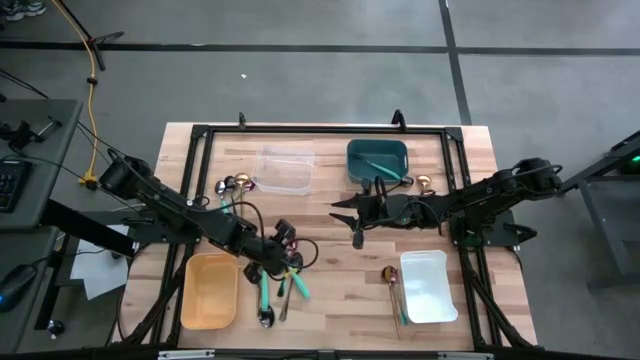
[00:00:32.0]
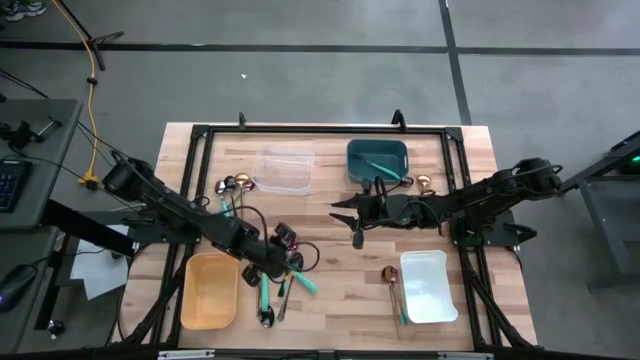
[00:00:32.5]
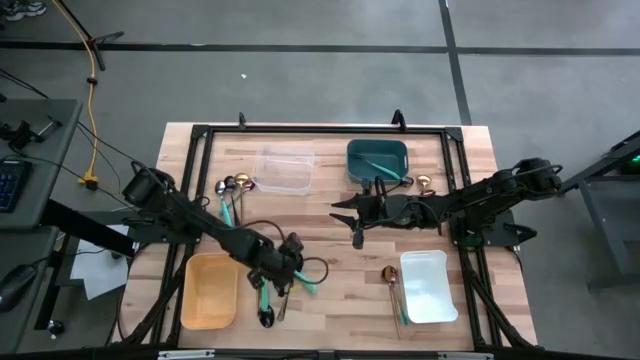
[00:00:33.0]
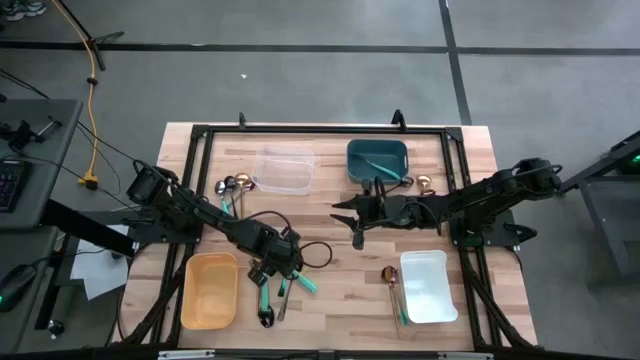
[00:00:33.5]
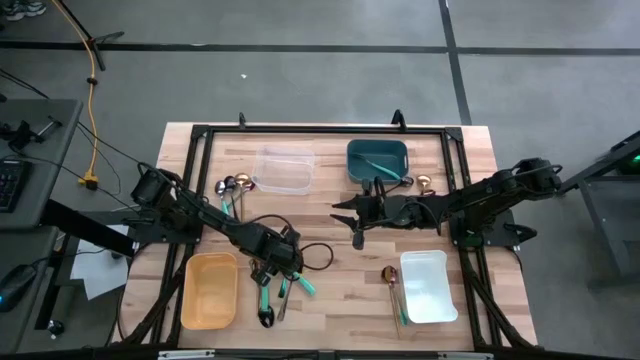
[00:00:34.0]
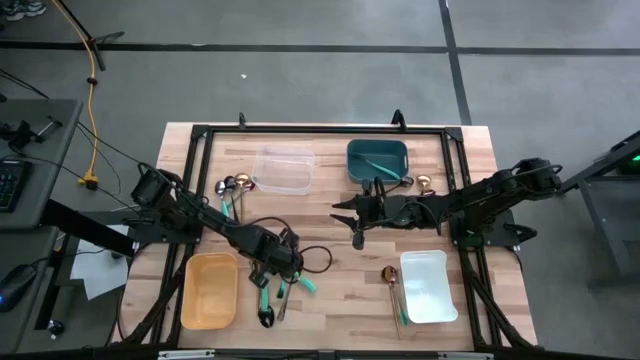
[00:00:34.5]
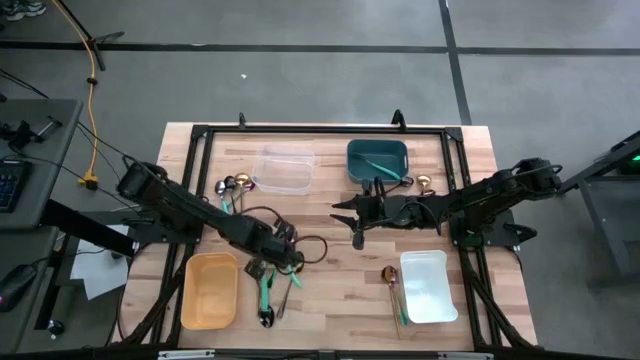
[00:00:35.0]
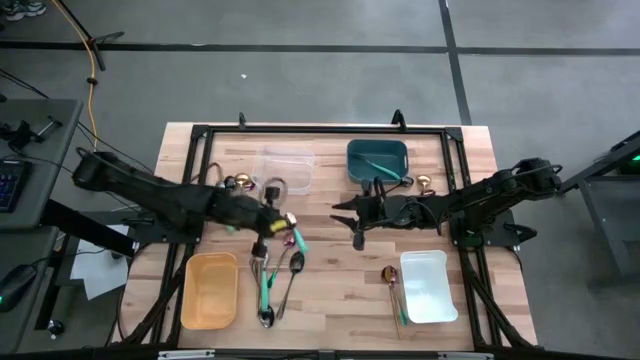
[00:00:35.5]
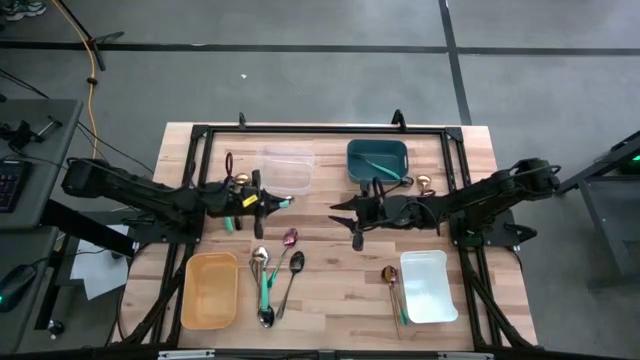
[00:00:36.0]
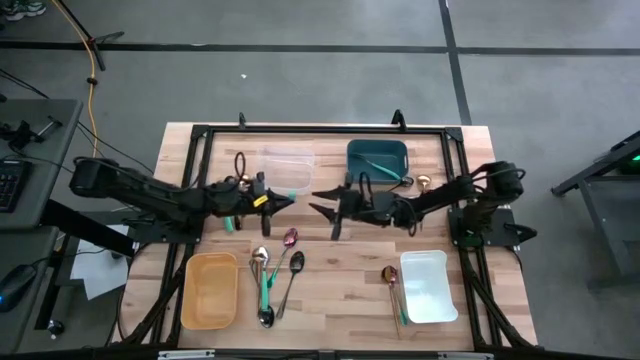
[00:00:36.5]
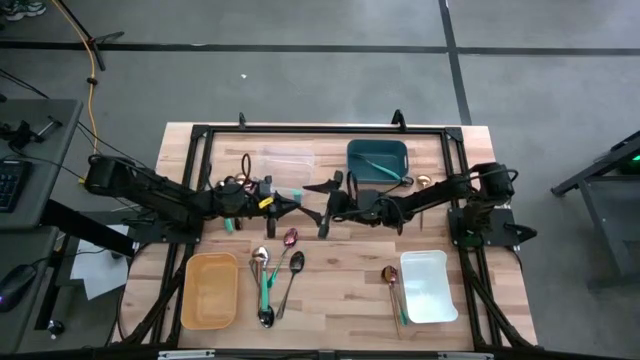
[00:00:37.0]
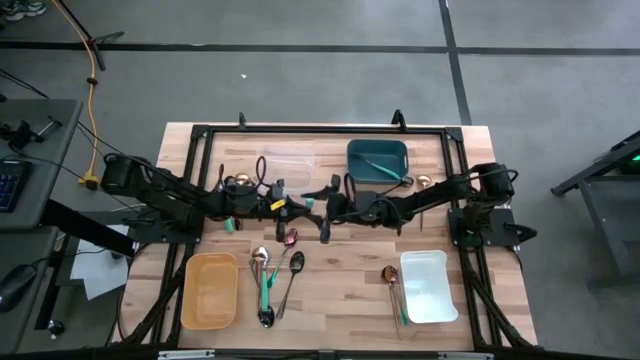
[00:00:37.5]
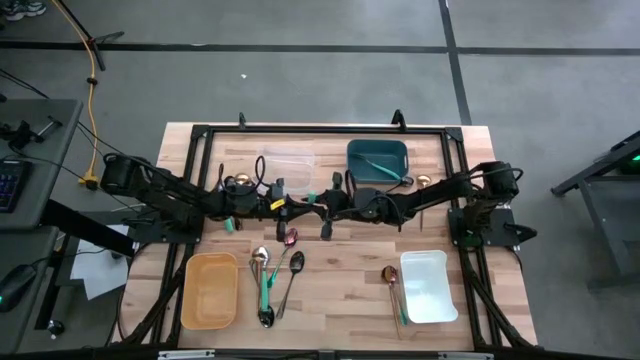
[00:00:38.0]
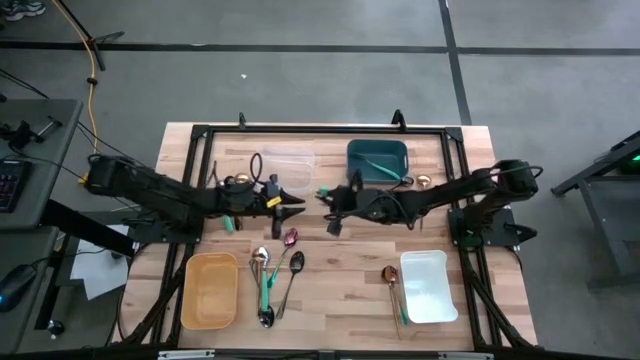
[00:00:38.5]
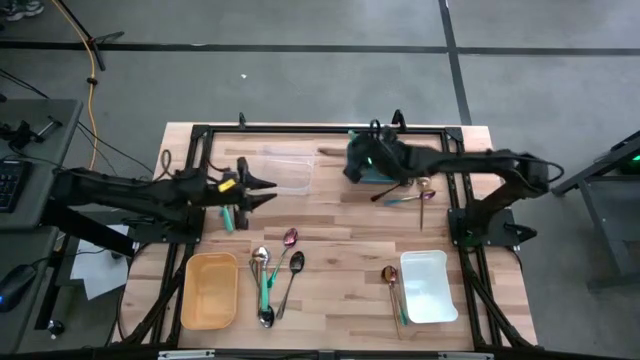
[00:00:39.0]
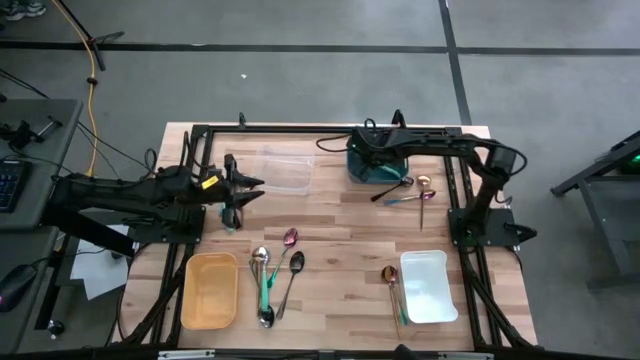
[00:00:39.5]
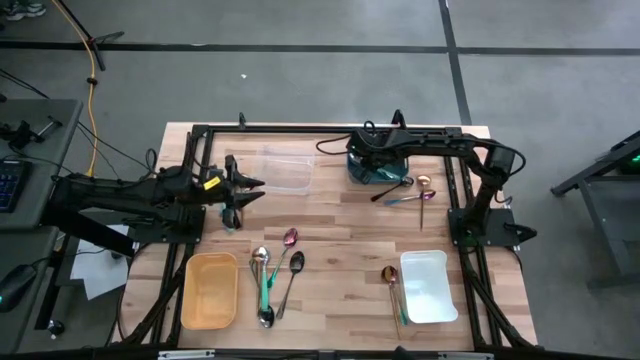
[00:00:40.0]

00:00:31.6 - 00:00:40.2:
Task: Sort silverware by color (type)
Put the green spoon into the blue bin

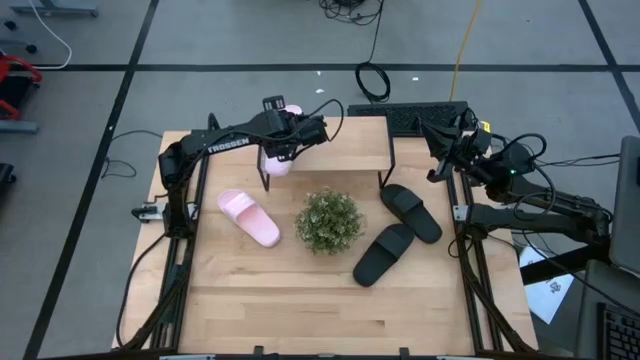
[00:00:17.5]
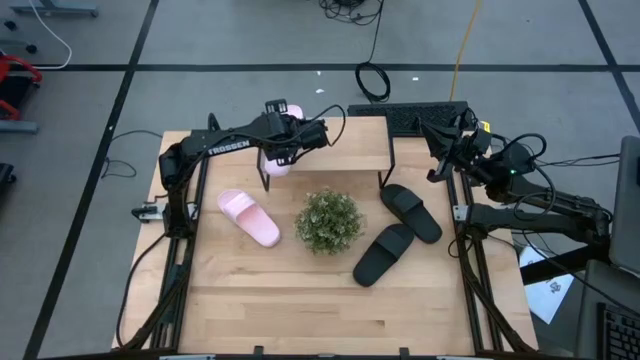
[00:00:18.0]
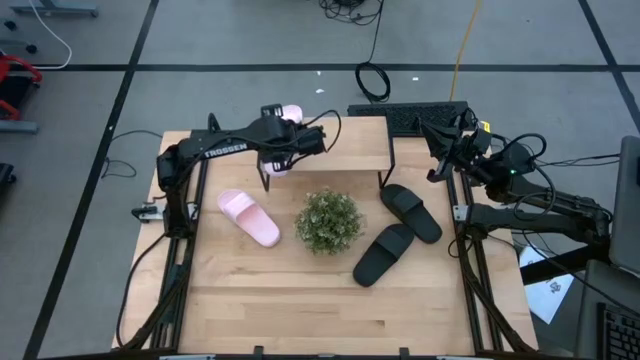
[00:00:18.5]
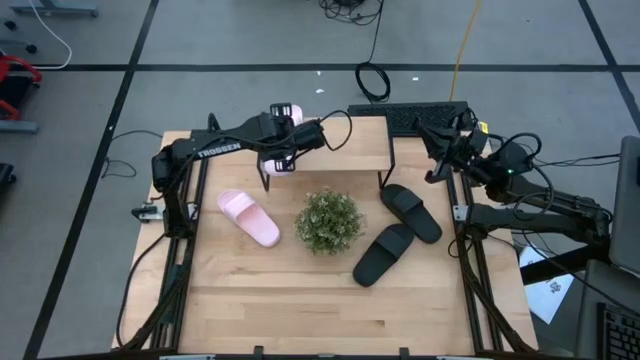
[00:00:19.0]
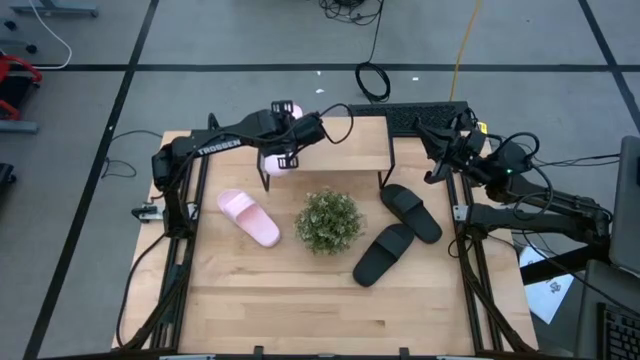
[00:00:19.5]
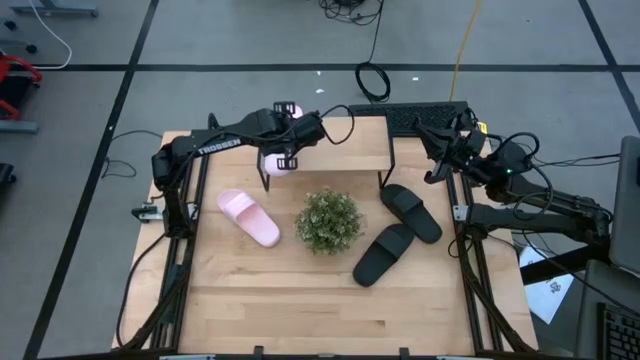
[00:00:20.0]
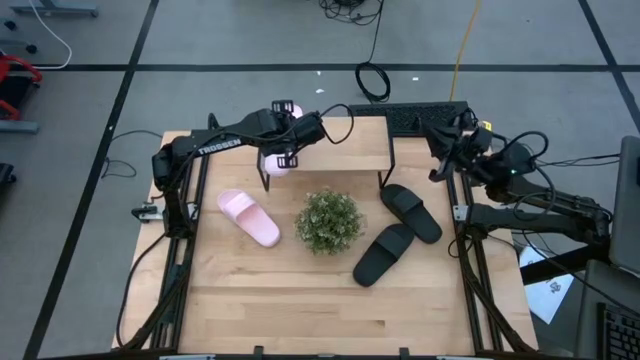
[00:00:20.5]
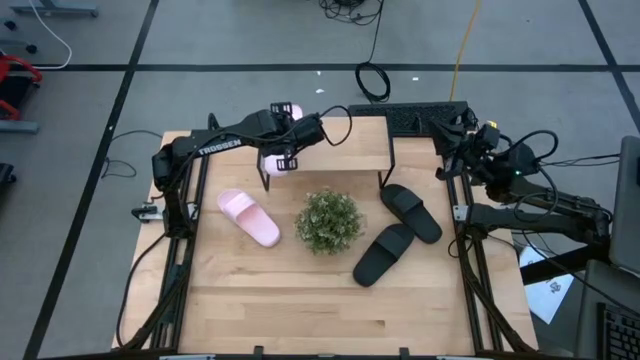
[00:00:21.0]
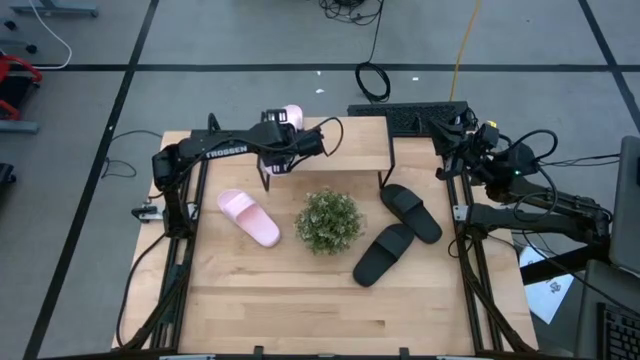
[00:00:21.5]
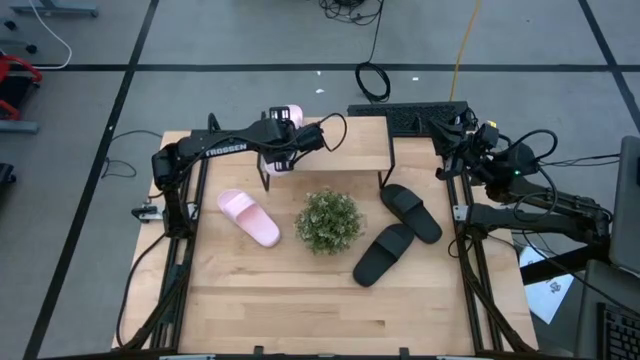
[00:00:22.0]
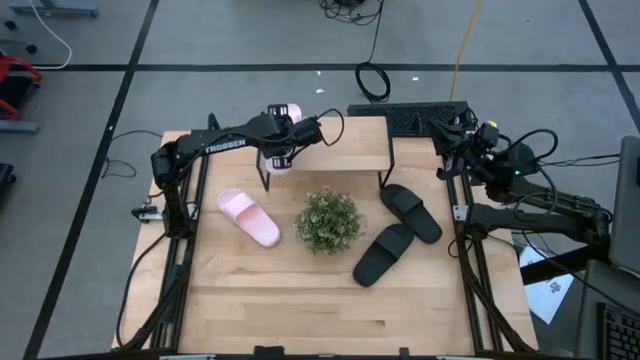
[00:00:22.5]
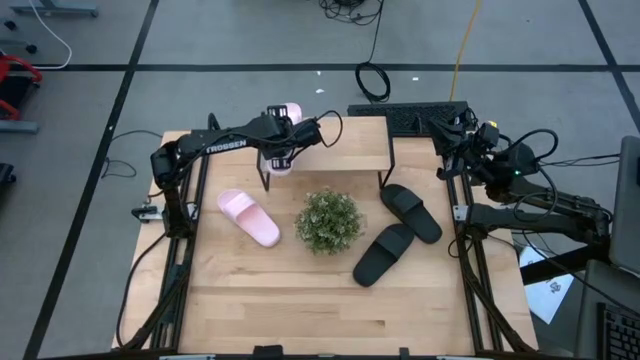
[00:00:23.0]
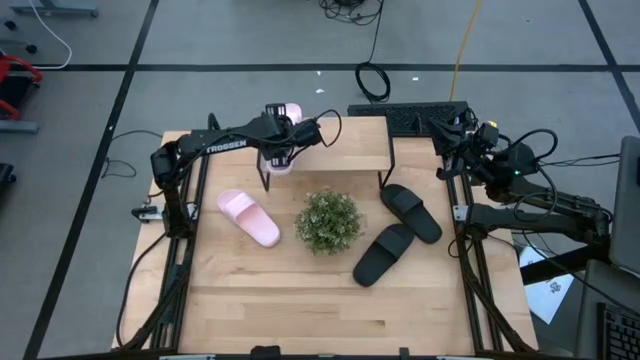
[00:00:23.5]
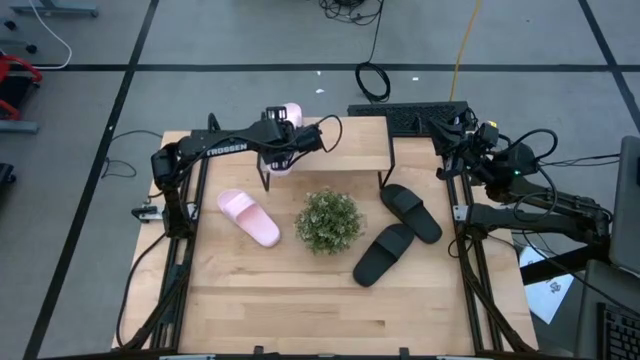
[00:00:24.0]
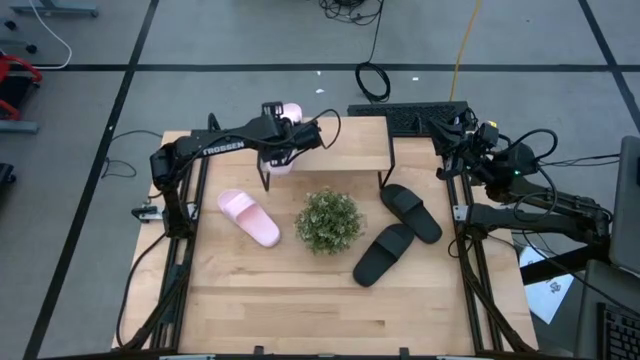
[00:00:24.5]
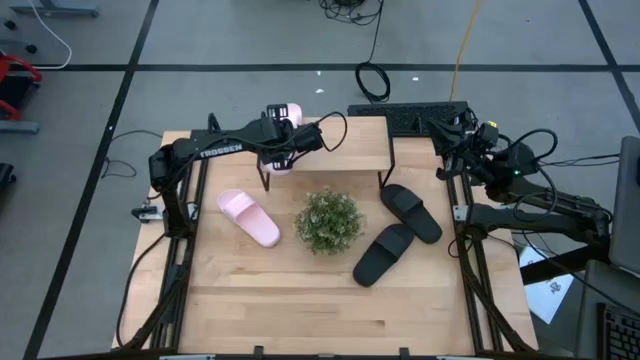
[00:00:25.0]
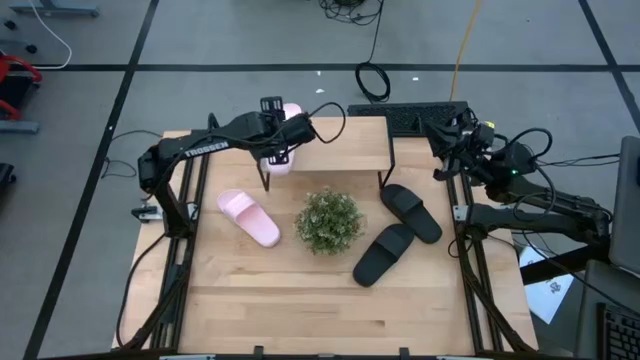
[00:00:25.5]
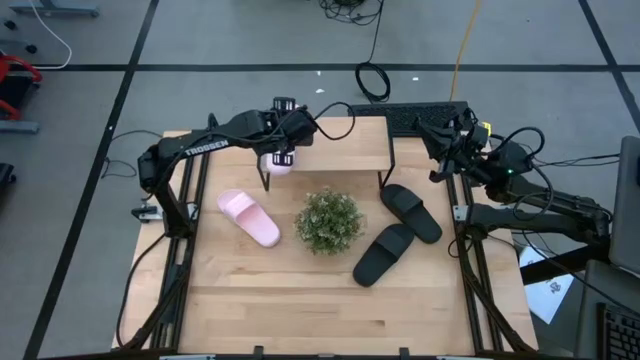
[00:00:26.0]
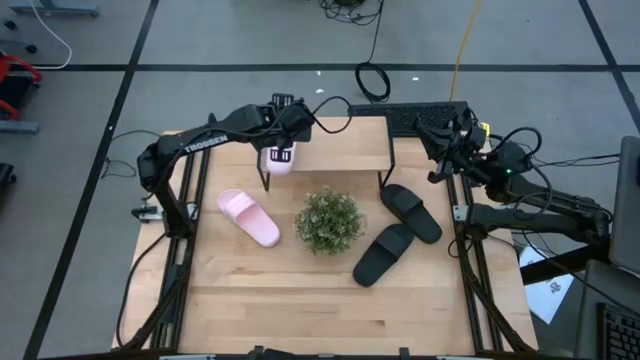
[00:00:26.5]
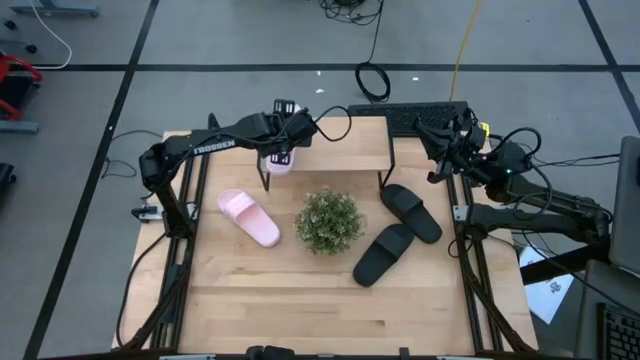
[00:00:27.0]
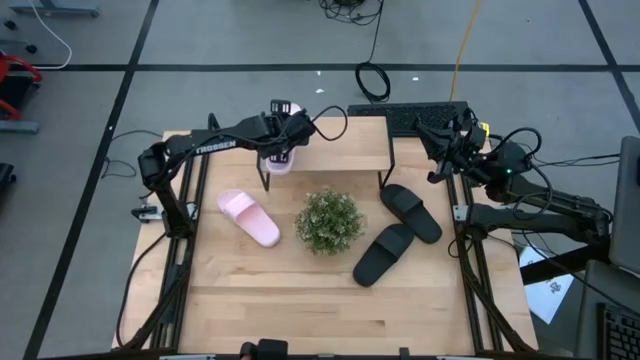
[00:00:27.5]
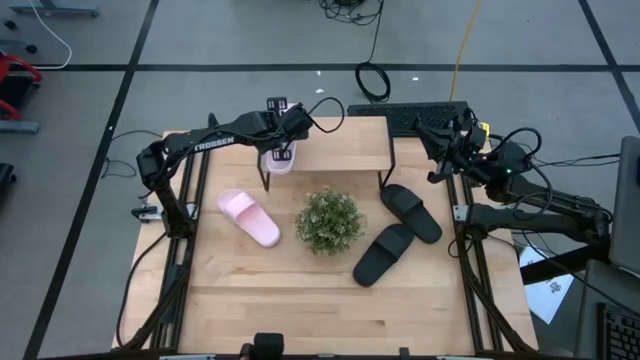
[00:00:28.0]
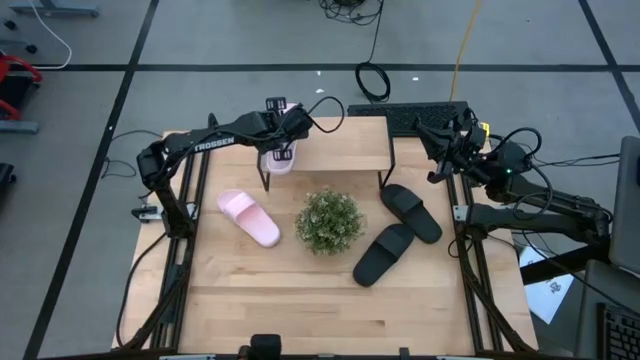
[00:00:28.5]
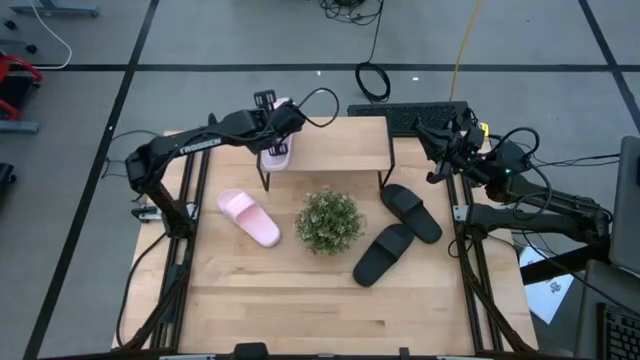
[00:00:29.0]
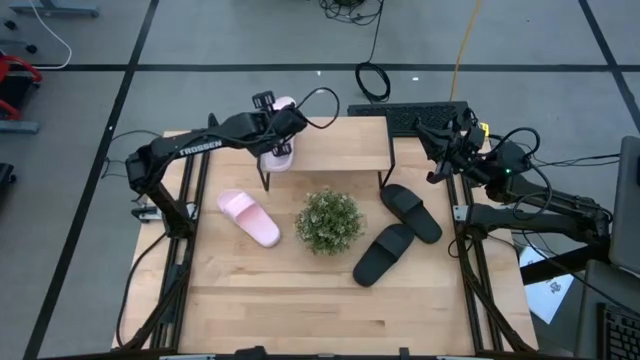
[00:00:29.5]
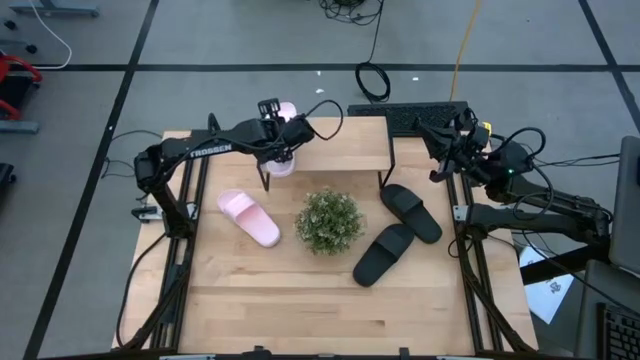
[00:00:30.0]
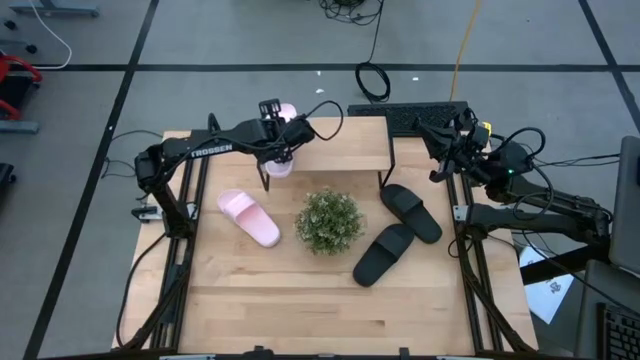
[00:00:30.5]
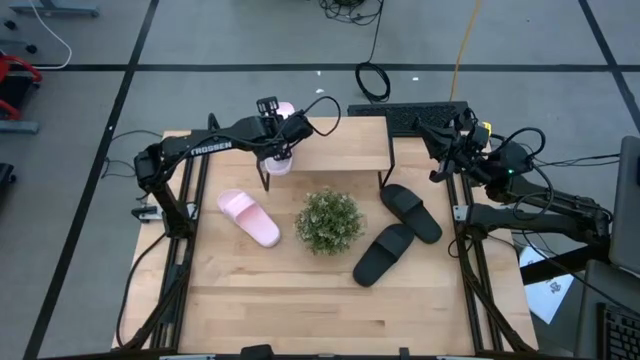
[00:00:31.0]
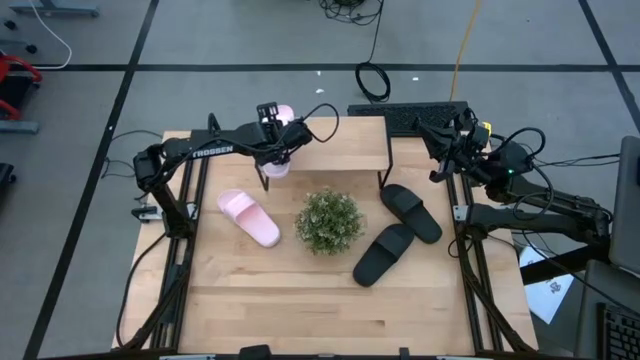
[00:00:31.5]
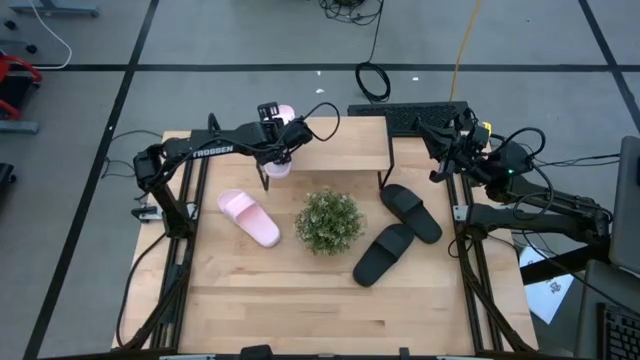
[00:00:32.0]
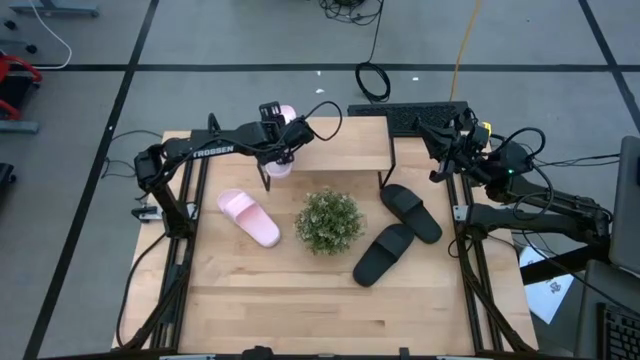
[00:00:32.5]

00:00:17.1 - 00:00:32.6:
Task: Pick and place slides into the shelf
Put the bottom pink slipper on the shelf
